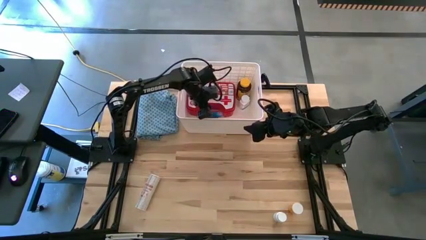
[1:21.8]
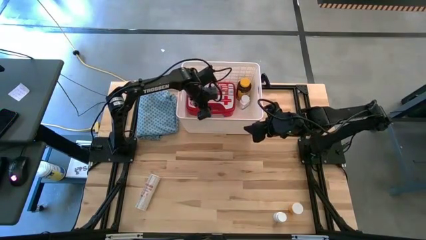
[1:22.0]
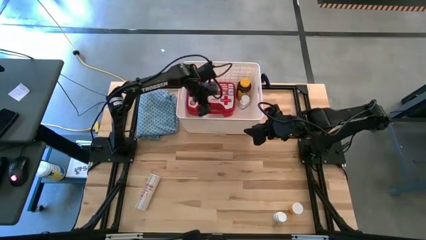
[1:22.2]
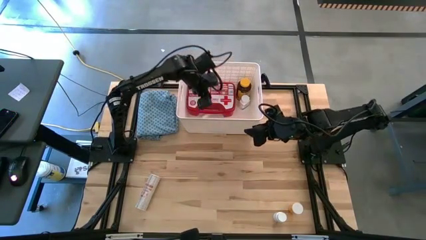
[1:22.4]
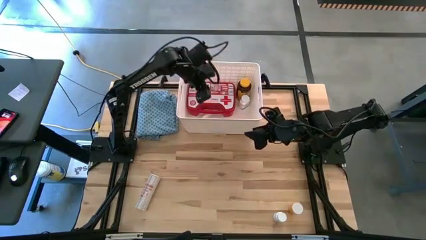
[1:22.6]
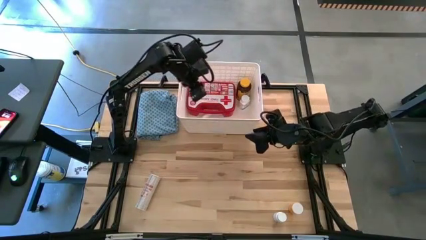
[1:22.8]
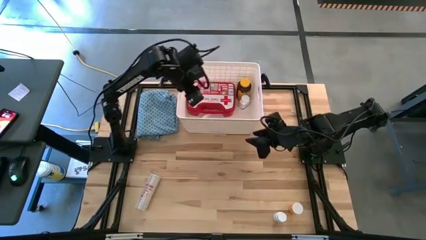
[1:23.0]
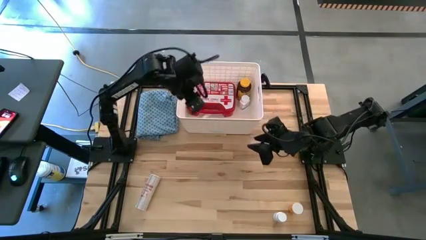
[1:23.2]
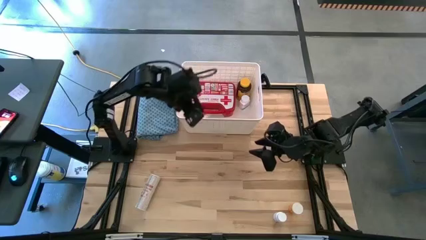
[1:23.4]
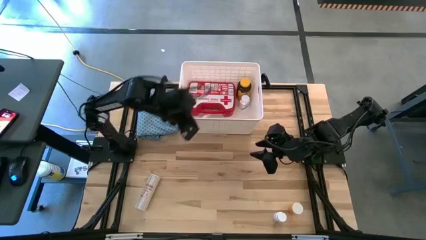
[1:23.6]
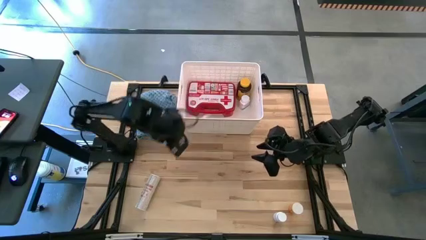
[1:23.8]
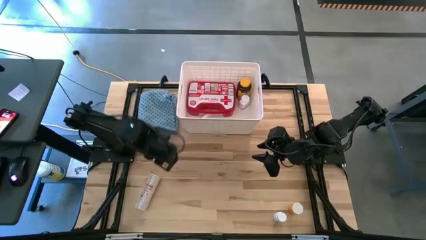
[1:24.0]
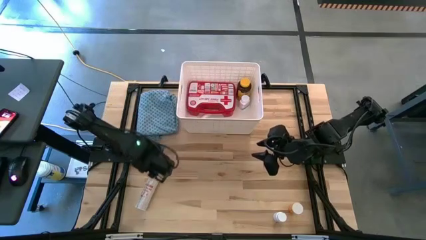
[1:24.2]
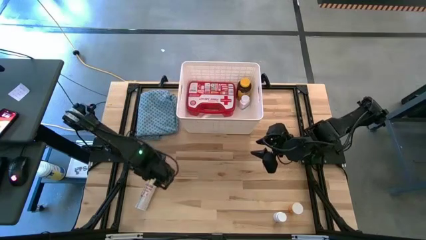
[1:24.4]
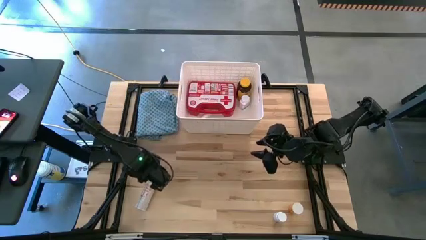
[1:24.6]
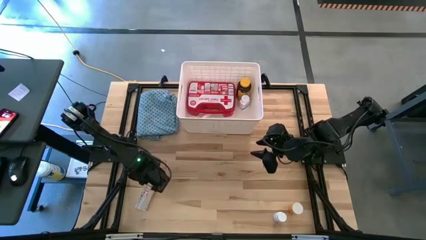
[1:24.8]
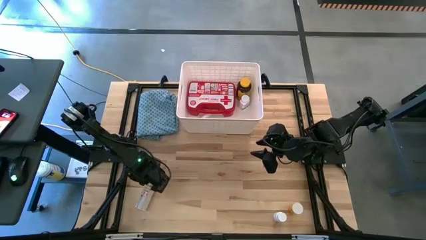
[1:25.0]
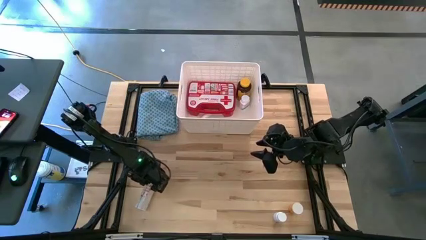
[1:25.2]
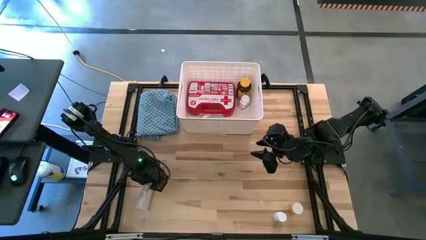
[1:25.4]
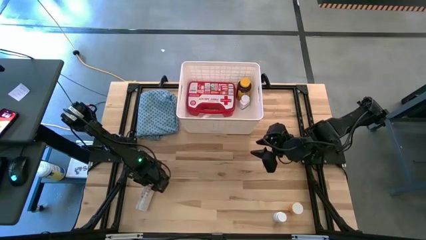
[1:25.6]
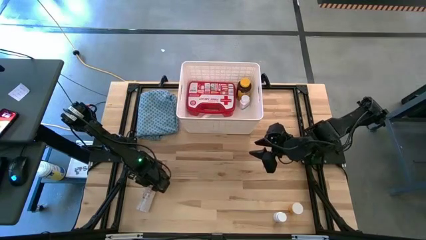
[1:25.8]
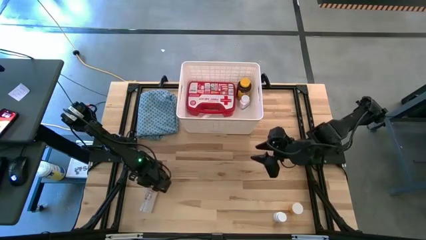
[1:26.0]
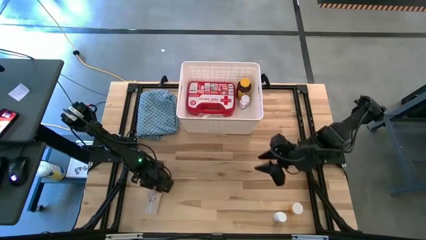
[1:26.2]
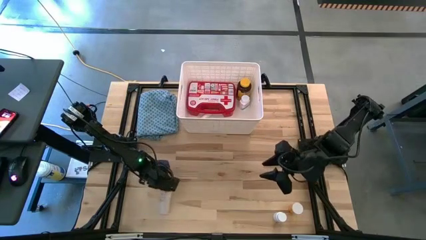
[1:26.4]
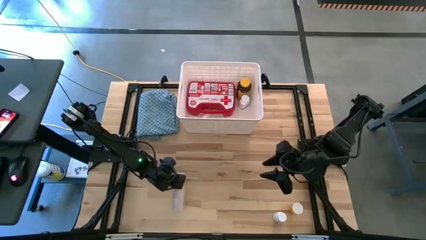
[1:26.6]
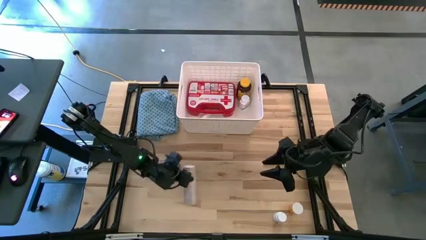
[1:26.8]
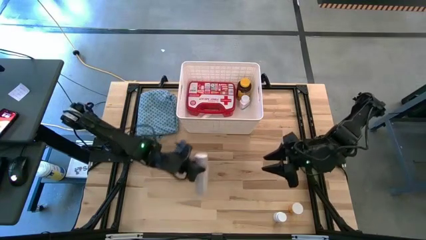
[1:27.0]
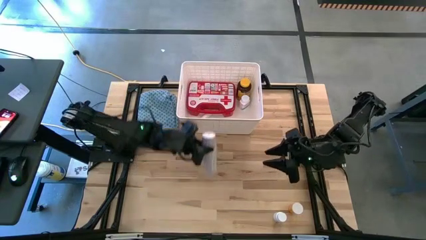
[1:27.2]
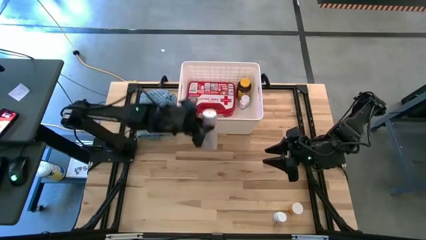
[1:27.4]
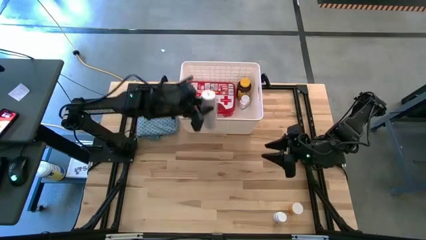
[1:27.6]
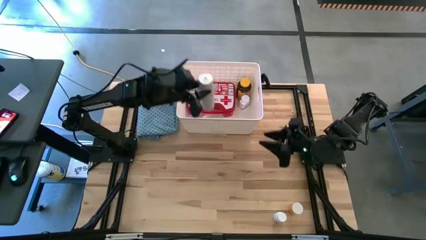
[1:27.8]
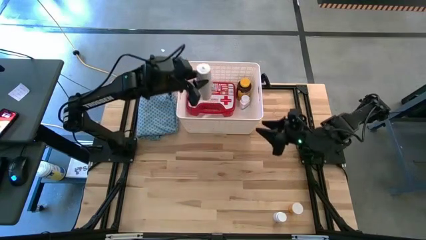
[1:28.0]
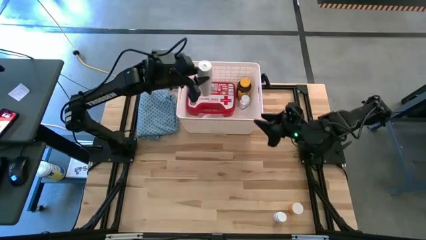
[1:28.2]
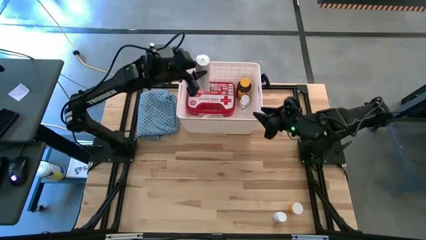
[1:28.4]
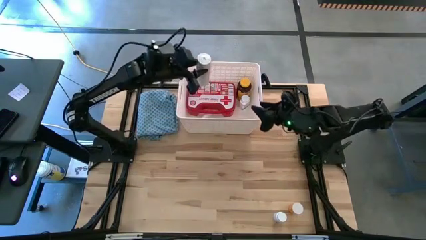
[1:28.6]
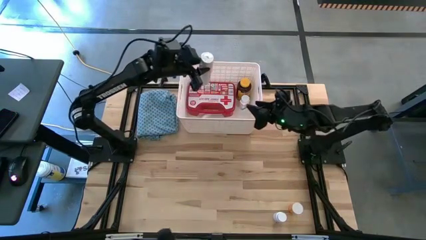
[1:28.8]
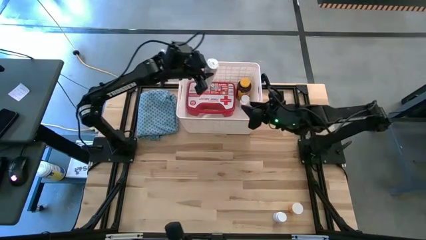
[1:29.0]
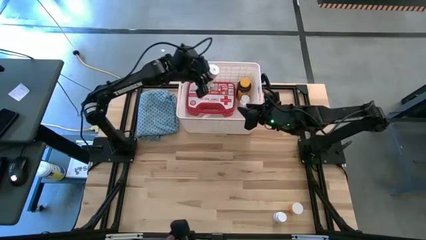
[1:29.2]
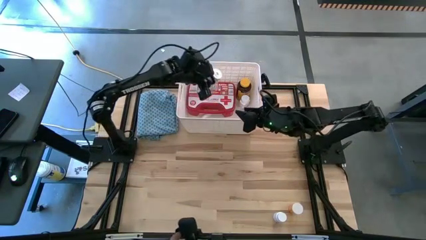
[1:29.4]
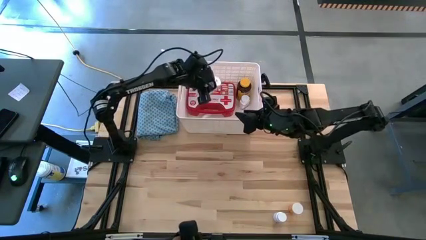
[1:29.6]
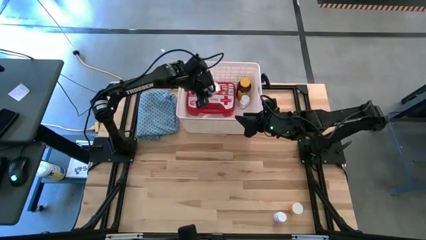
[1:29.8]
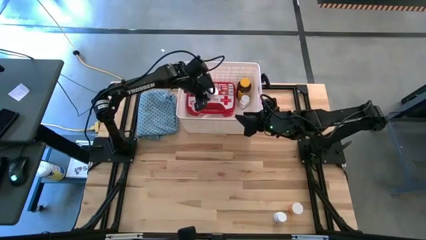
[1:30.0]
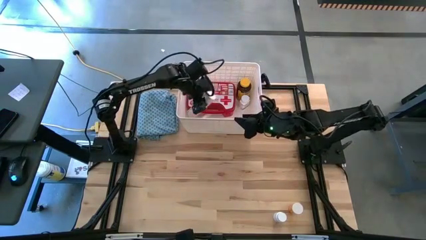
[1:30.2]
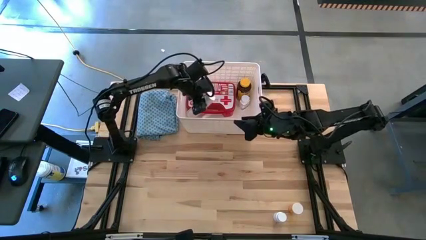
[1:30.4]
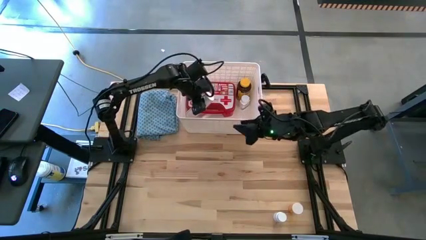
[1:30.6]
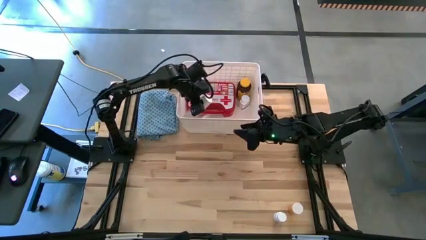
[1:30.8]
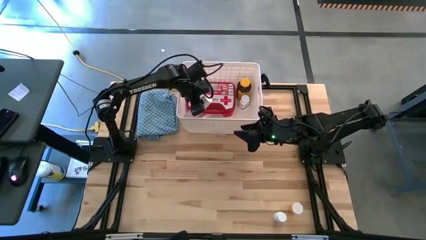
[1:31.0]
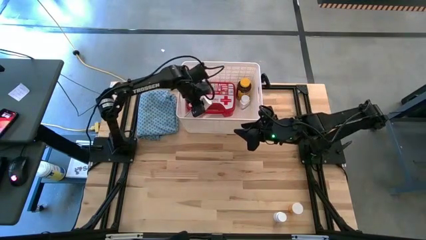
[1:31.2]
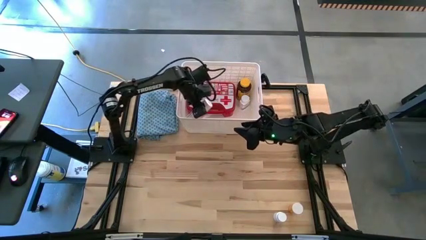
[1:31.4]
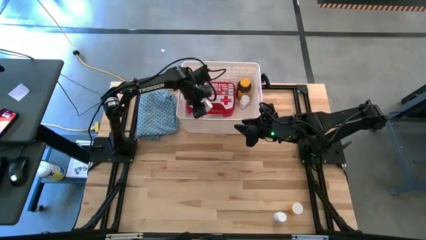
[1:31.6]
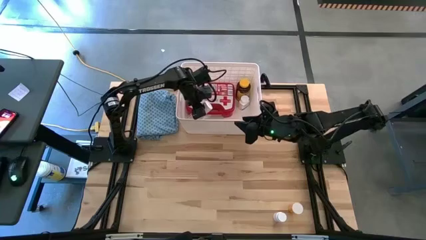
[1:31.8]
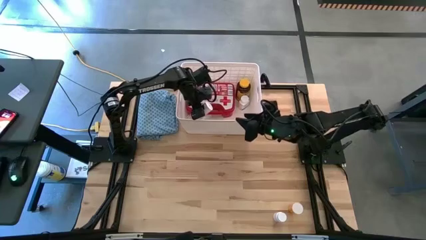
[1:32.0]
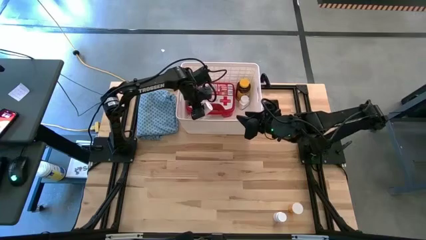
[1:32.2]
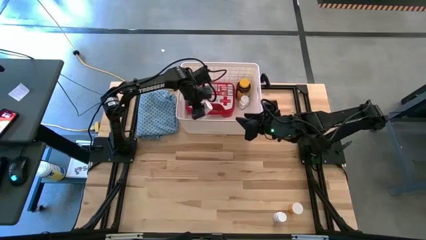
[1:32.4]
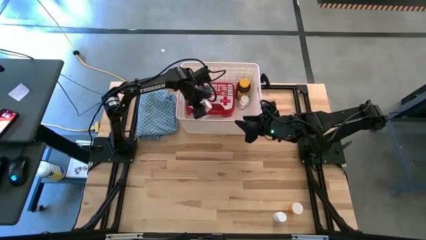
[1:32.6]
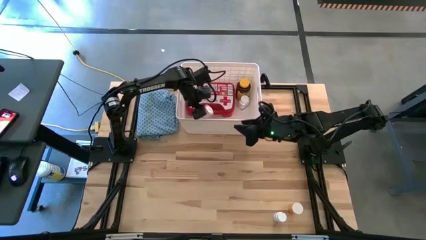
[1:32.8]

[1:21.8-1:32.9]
Task: Pick & place medical supplies in basket/bin
Put the white bandage into the white bin

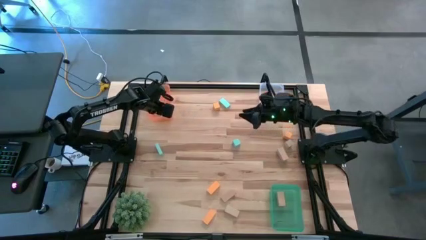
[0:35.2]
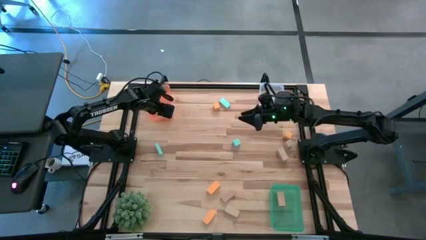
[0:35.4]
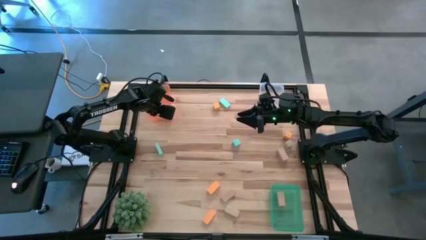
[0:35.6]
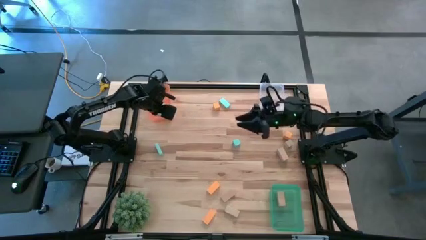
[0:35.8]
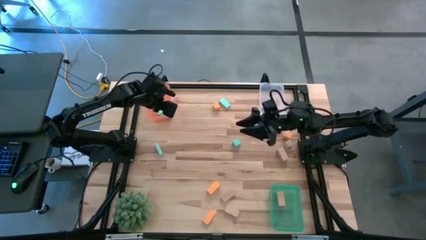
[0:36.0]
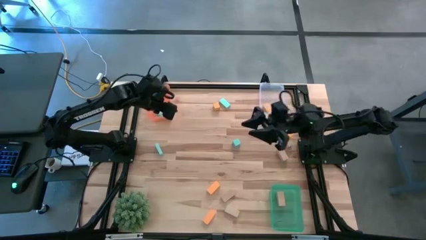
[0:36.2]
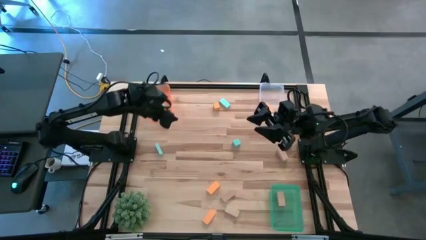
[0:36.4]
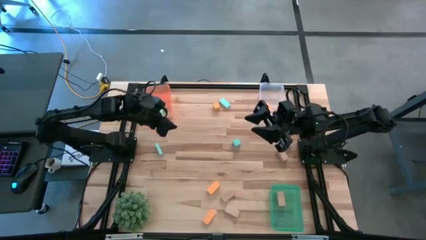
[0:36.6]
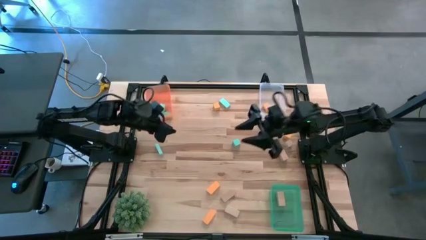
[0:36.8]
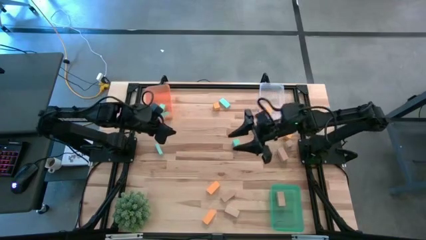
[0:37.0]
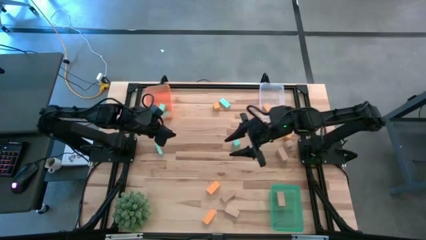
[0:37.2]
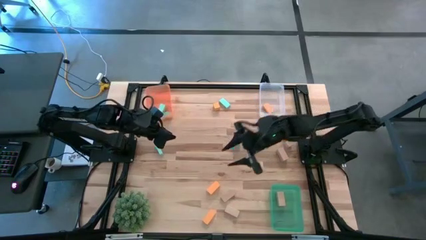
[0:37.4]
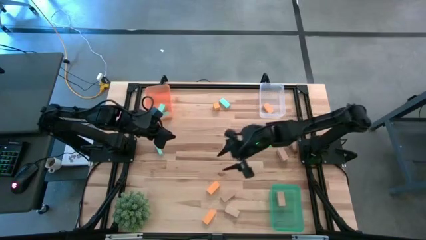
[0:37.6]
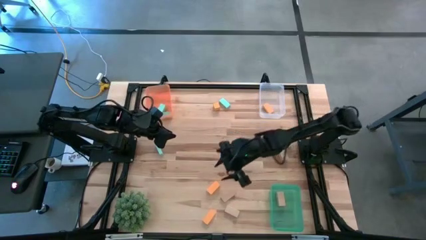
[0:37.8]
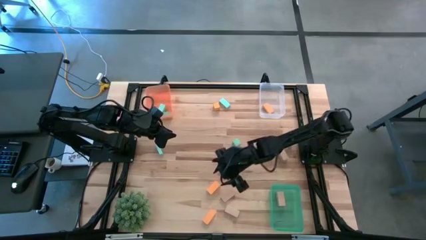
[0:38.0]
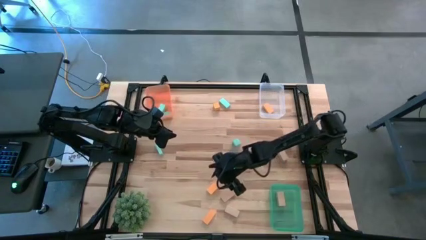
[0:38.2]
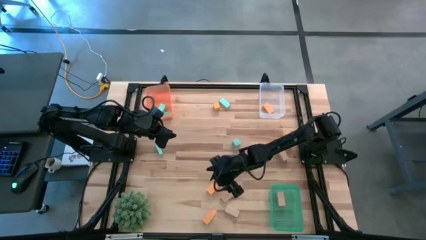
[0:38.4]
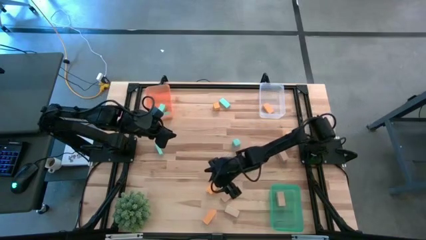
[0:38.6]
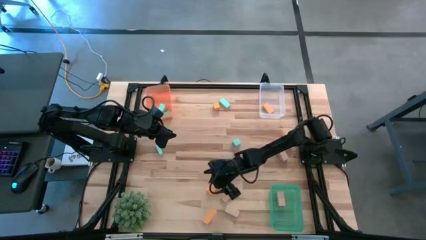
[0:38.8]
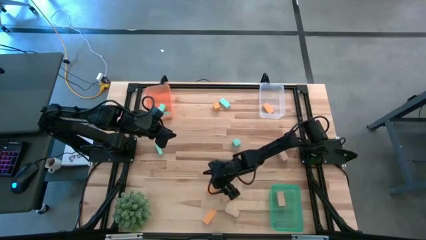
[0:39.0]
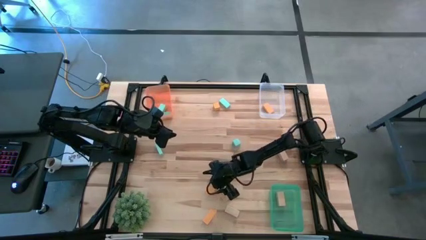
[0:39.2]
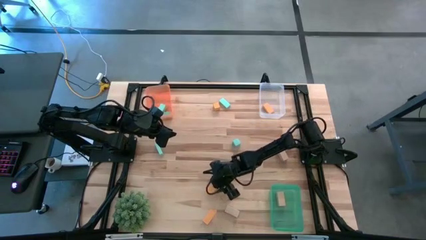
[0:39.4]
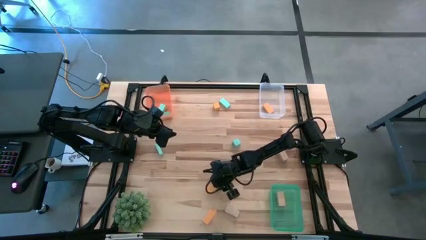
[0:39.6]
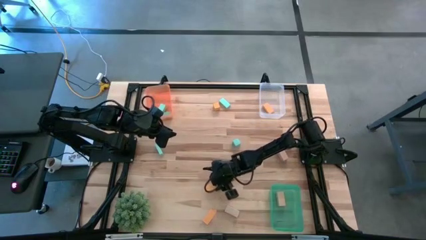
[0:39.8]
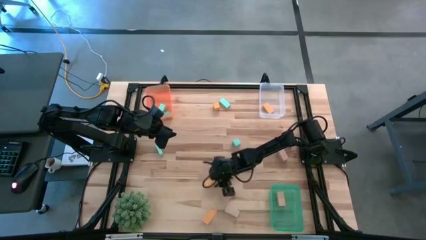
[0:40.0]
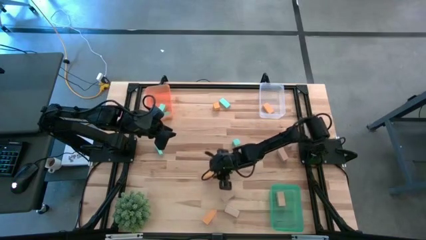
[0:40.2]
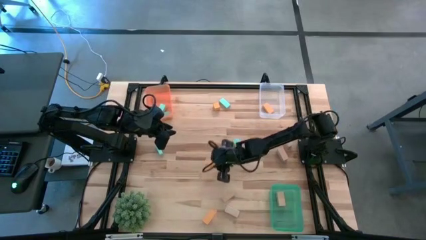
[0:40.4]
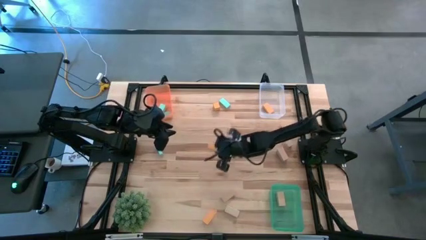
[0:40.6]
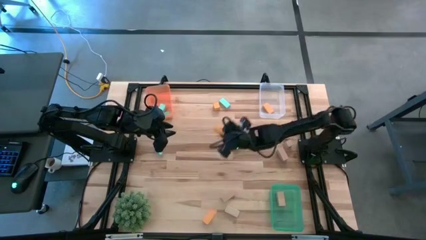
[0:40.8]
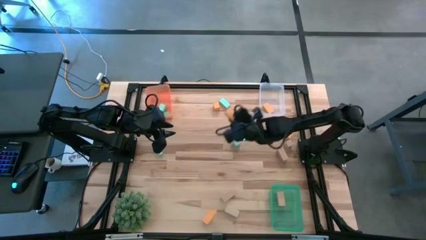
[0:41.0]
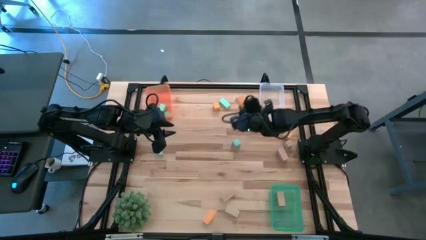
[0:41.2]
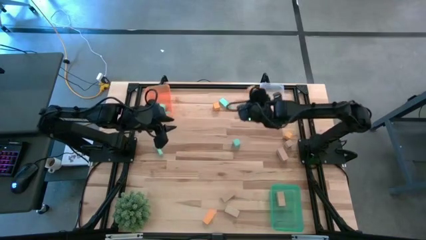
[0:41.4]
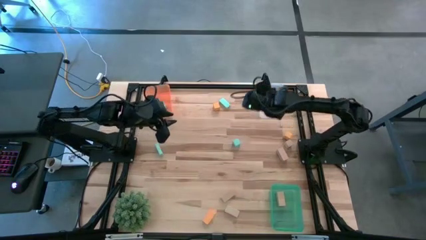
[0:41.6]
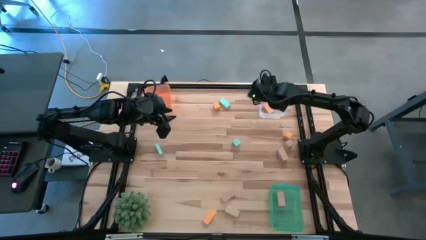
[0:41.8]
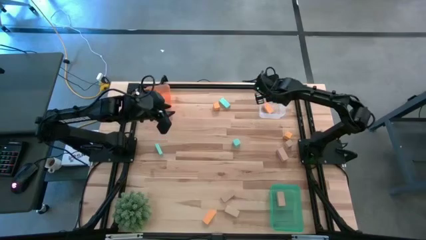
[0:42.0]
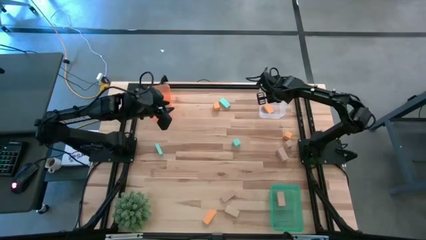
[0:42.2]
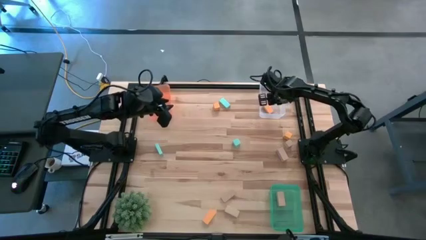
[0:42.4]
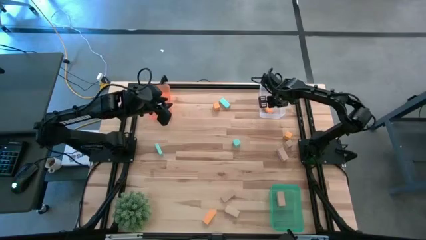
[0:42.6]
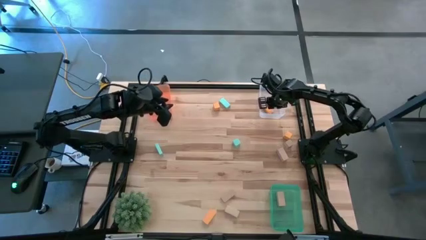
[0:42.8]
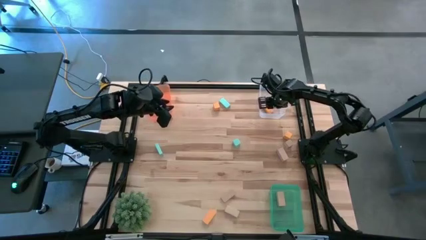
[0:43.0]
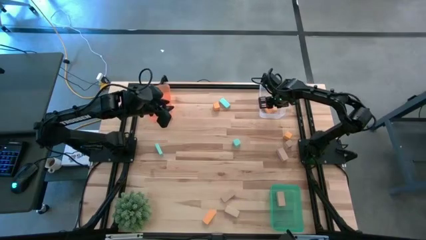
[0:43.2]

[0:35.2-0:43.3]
Task: Sort & place blocks by color
Put the orange block into the transparent bin
